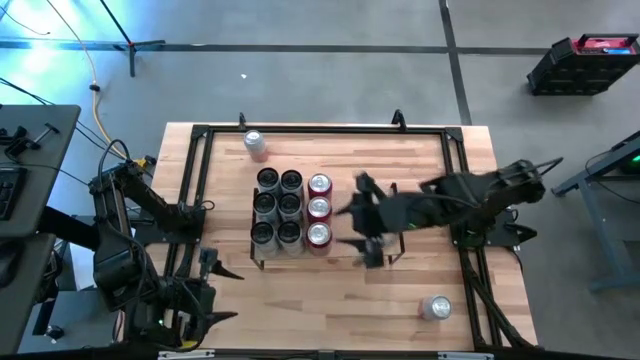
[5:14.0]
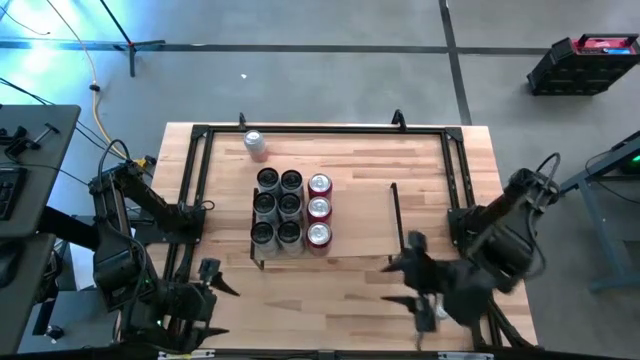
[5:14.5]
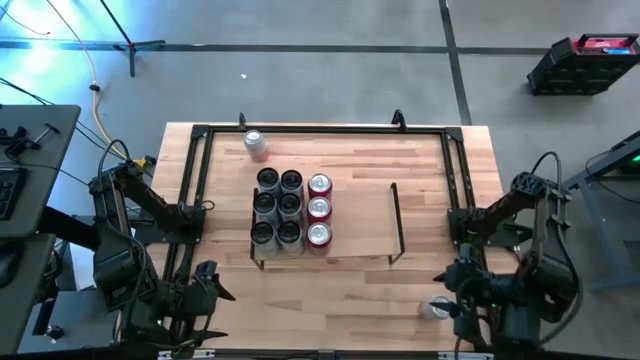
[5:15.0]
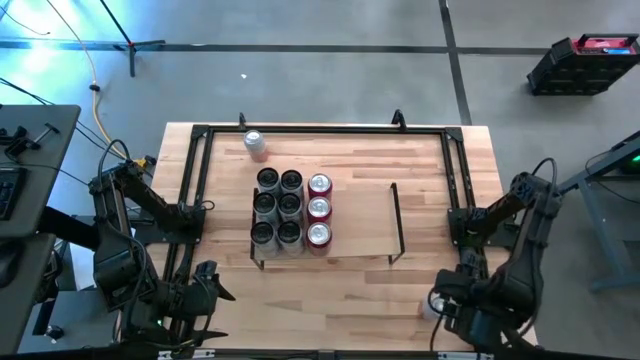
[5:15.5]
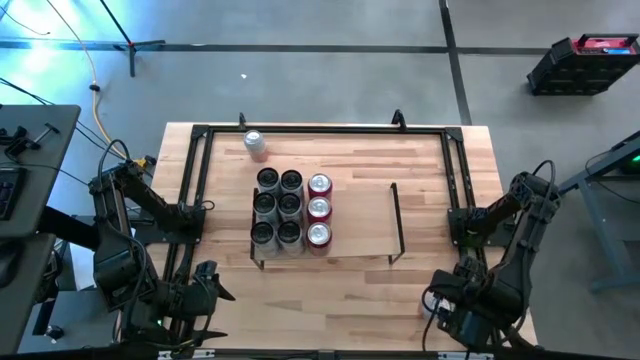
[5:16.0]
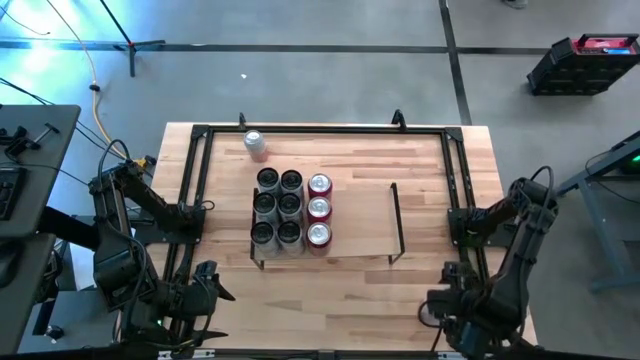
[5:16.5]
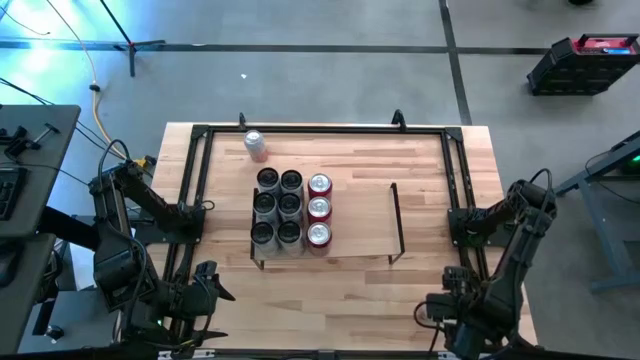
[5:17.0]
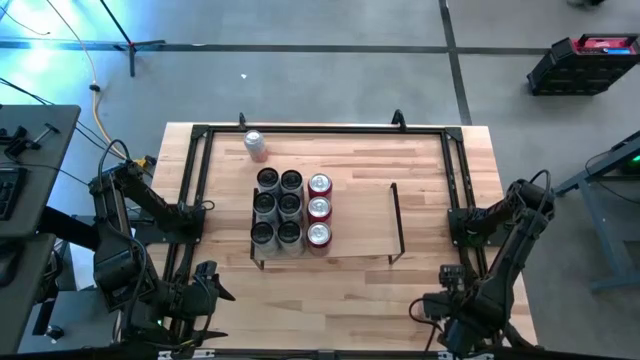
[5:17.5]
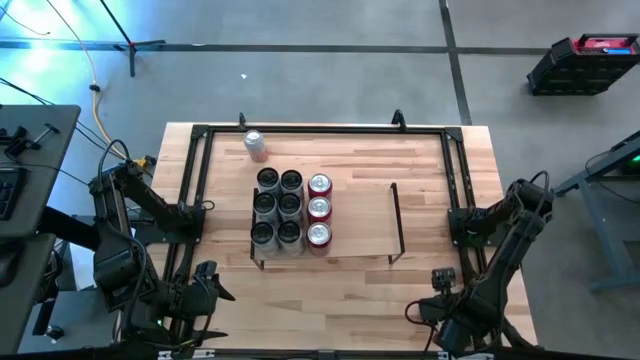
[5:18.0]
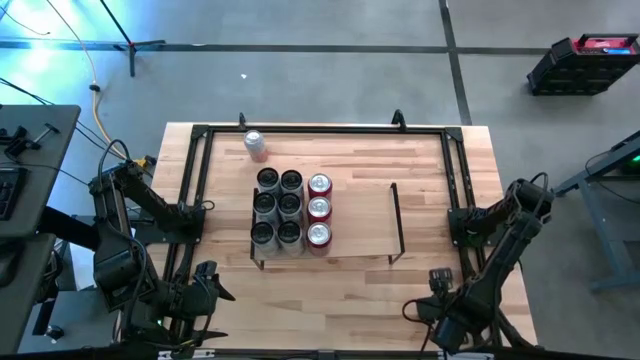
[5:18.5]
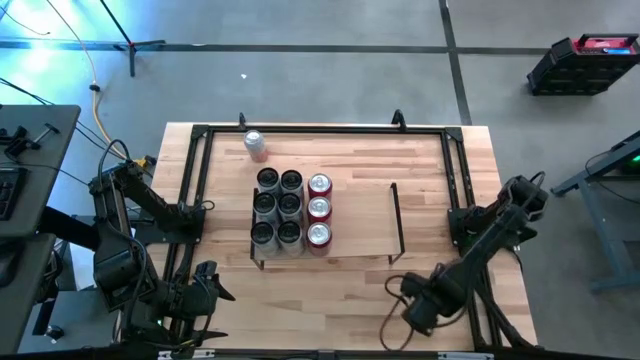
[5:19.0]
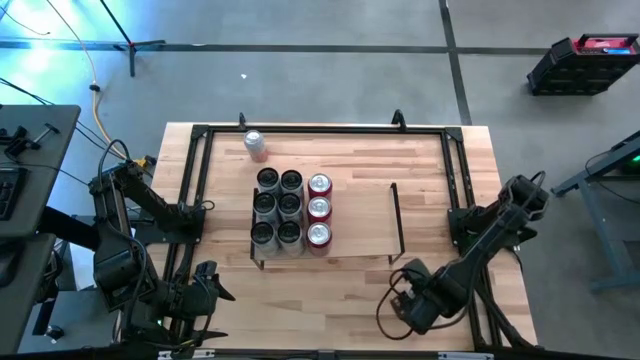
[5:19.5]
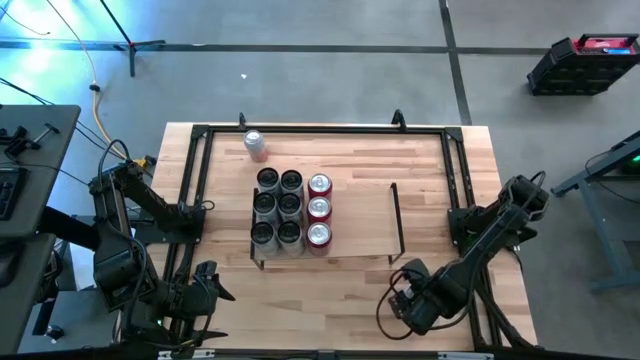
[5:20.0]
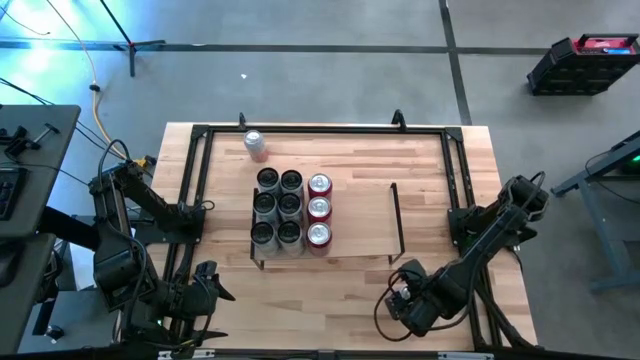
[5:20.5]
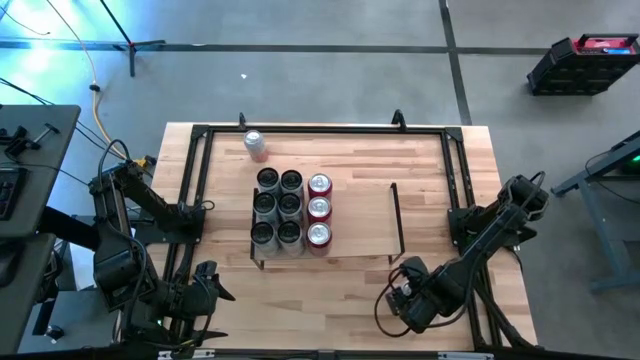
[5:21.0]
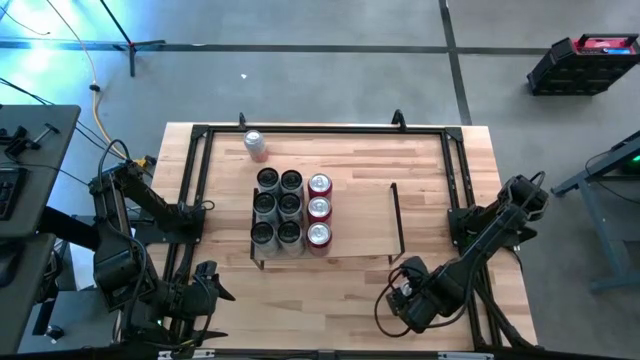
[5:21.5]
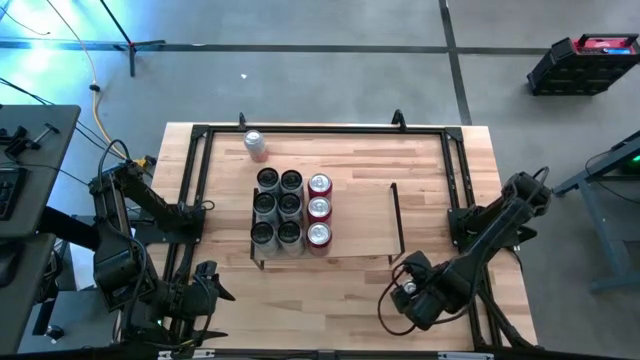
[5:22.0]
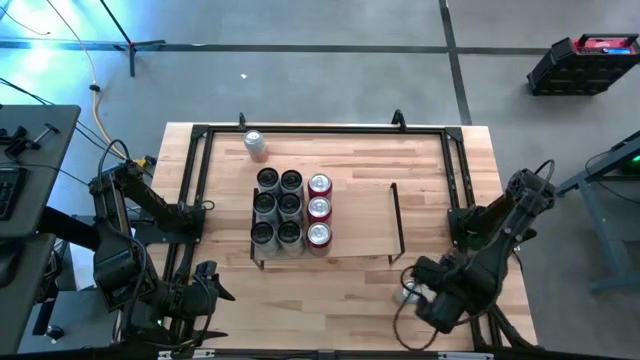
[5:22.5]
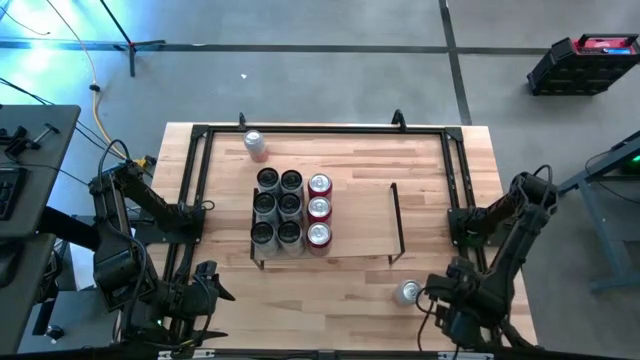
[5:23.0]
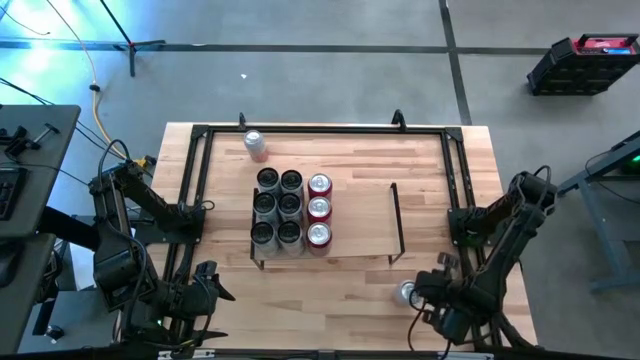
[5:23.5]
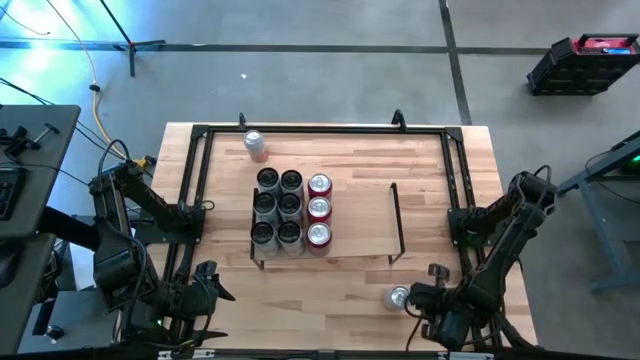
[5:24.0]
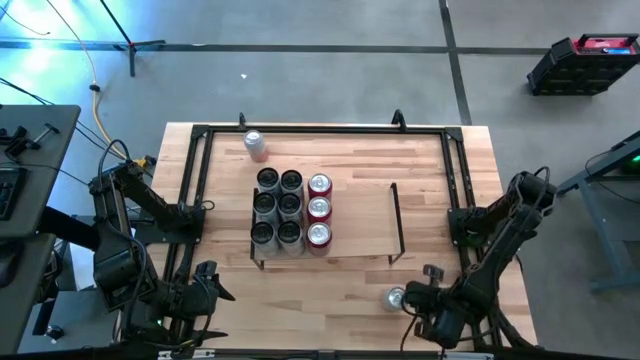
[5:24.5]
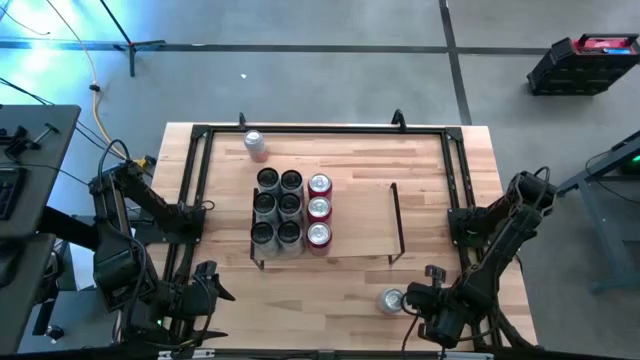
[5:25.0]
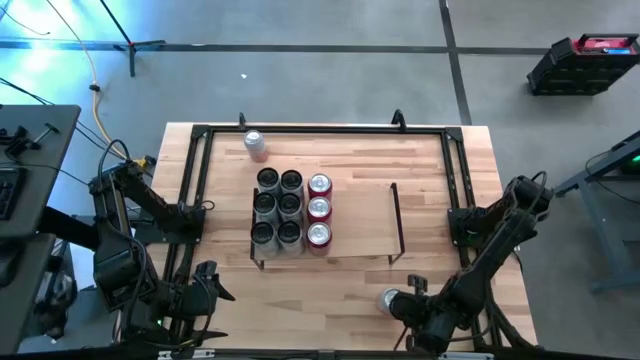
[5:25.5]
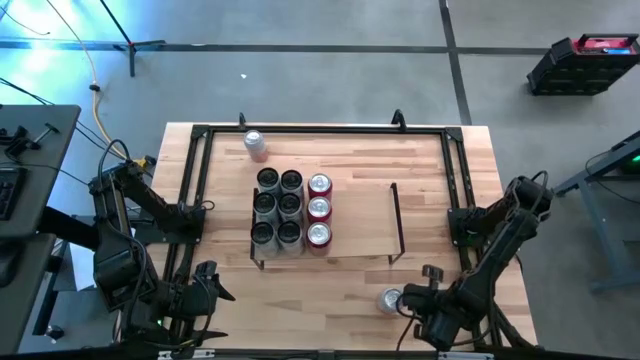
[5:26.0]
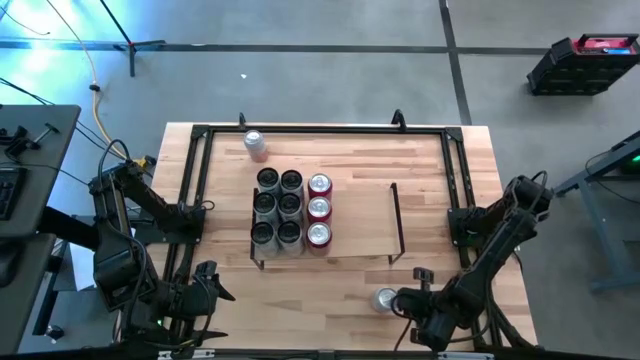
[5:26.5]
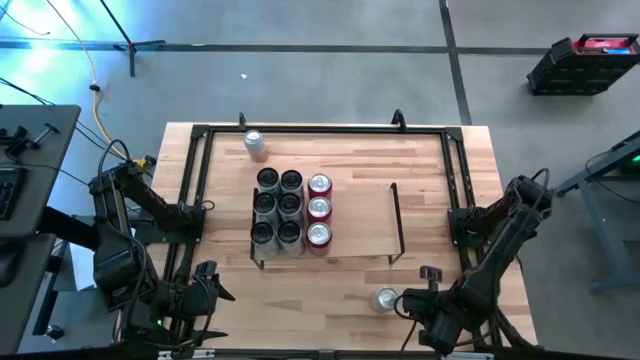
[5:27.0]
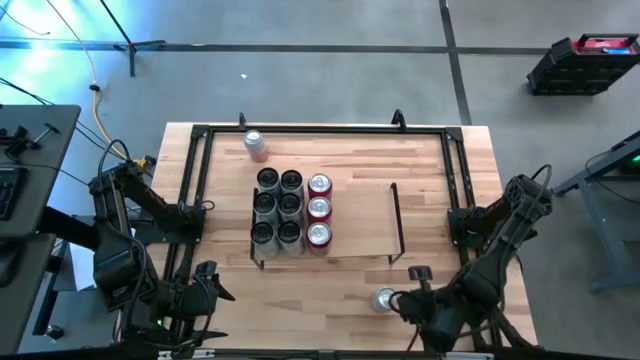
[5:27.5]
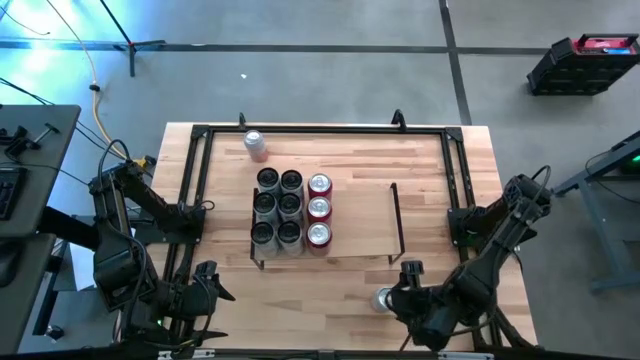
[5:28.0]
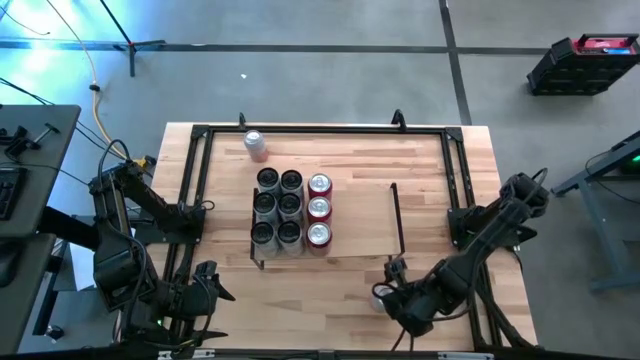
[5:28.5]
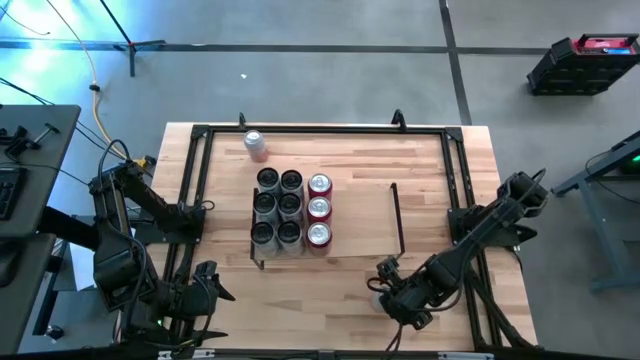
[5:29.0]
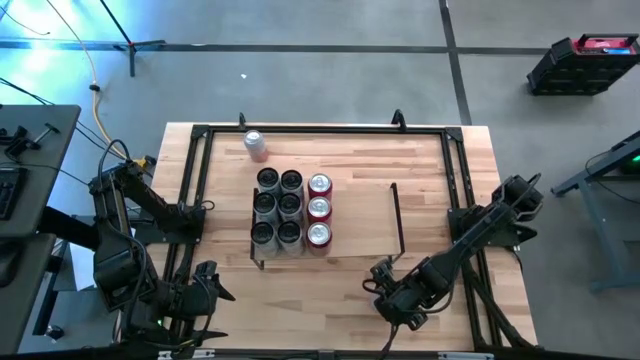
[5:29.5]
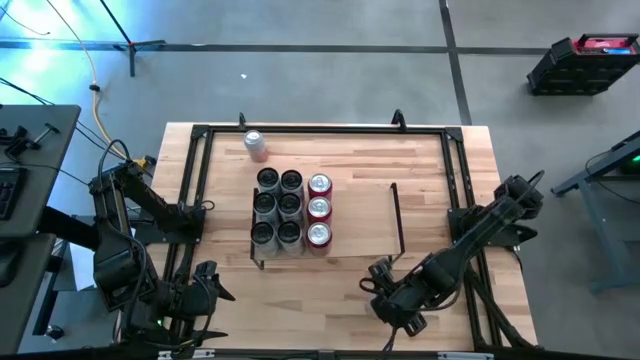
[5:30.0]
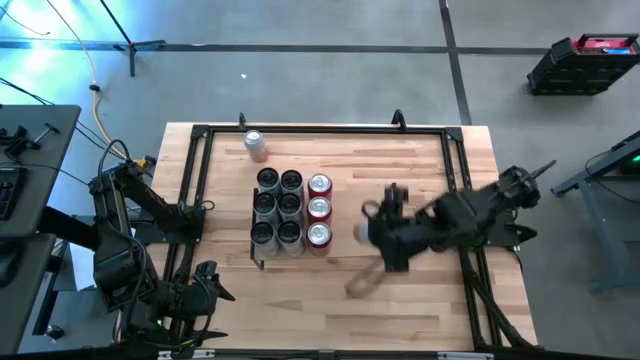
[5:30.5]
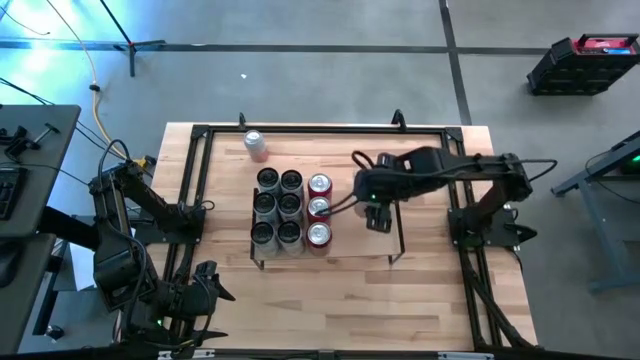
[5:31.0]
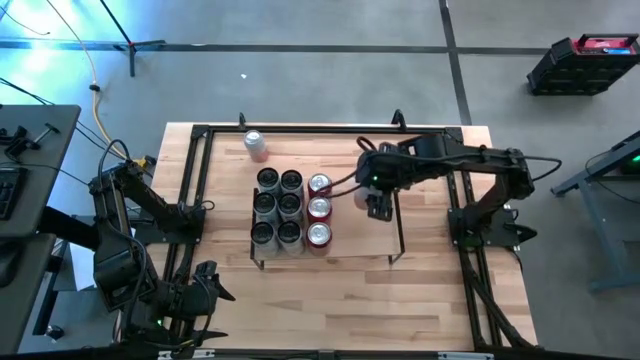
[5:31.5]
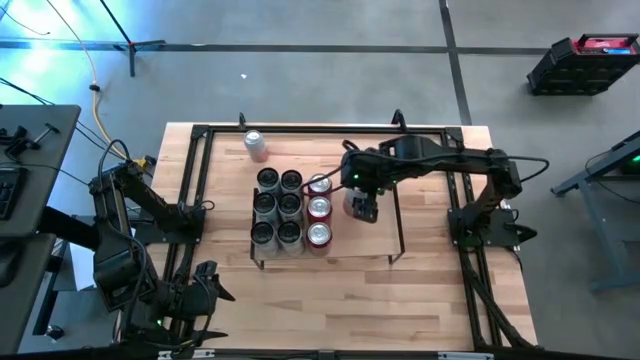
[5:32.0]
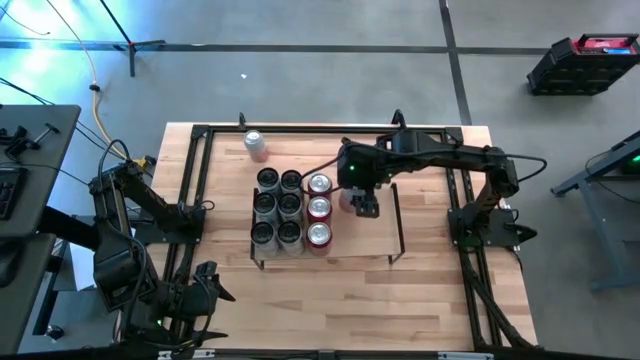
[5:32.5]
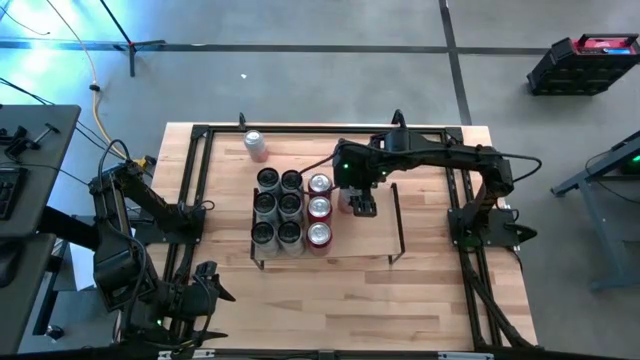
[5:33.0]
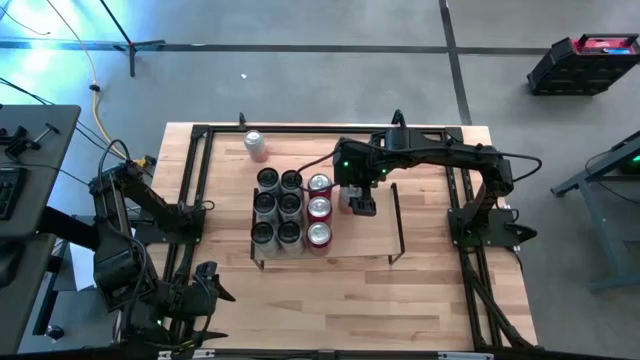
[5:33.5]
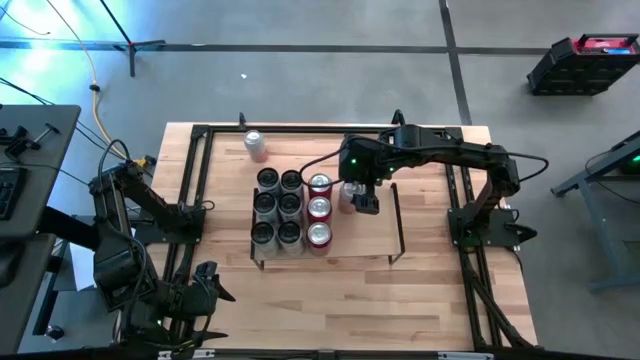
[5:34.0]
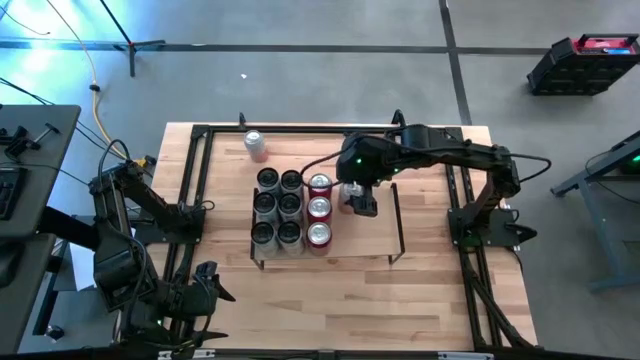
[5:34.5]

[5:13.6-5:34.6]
Task: Place canned beverage on shelf
Put the bottom orange white soda can on the shelf

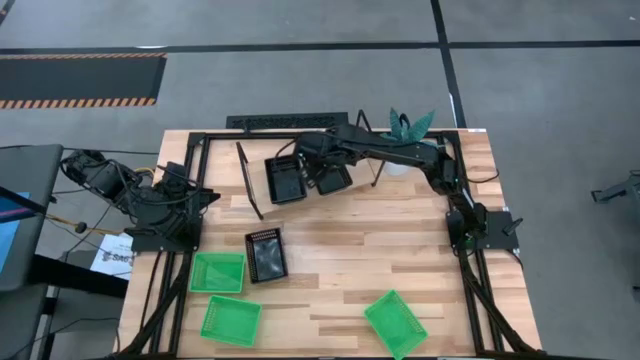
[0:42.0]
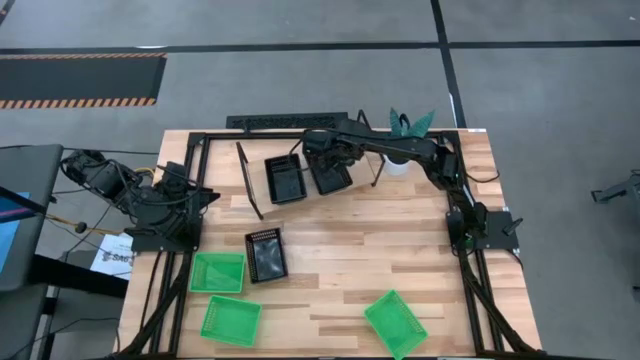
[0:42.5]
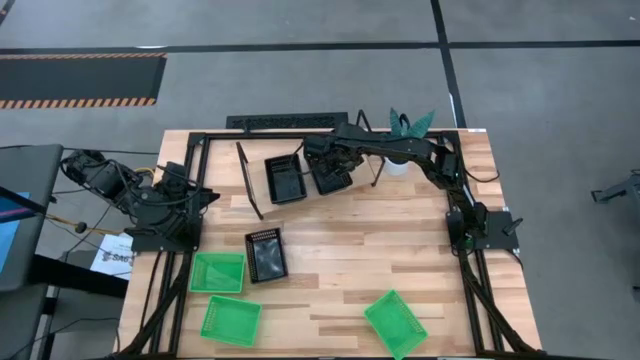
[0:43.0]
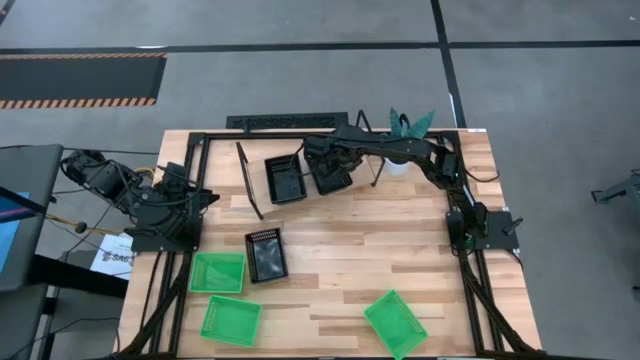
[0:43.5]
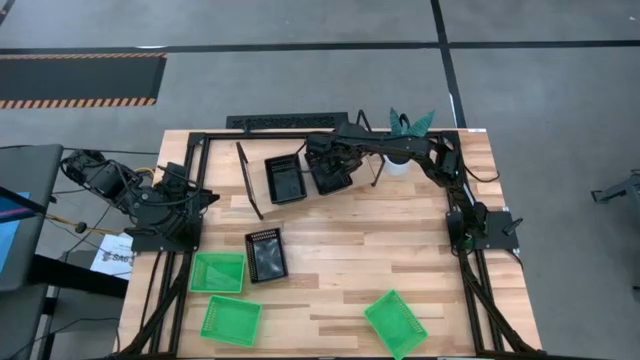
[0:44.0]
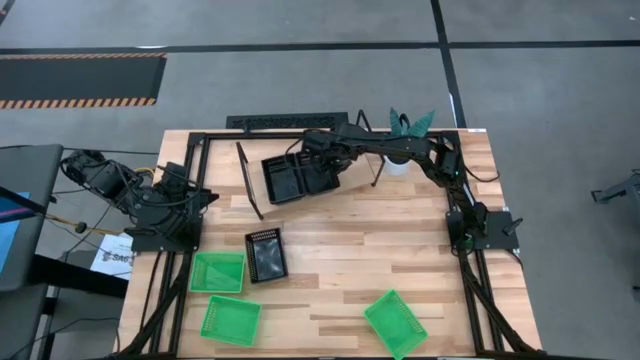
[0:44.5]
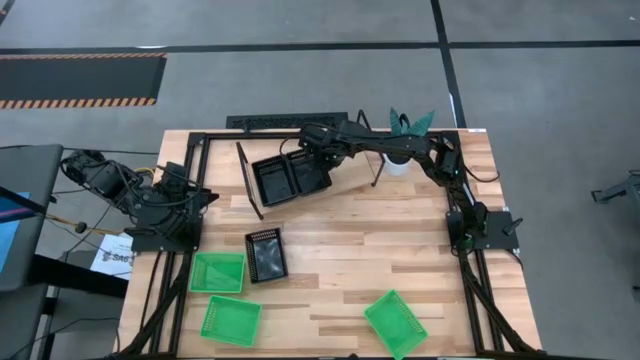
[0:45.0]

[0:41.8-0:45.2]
Task: Stack baskets on shelf by color
Adjust the black bins
